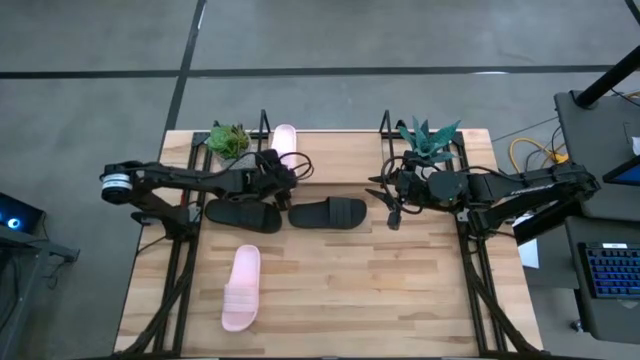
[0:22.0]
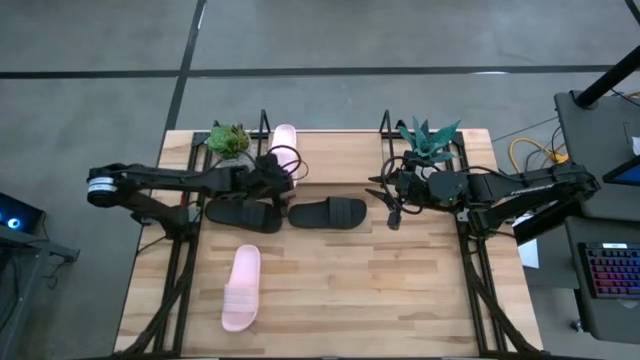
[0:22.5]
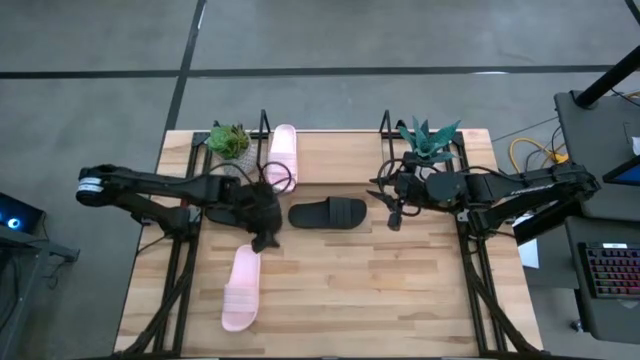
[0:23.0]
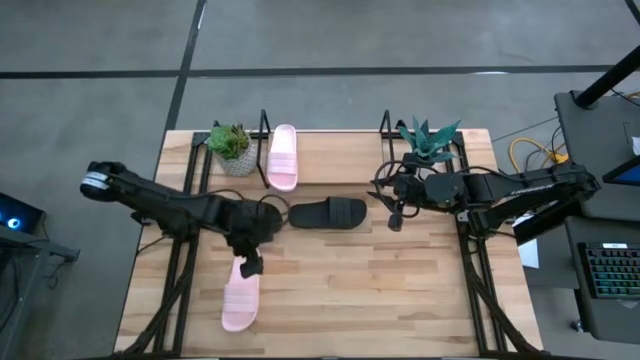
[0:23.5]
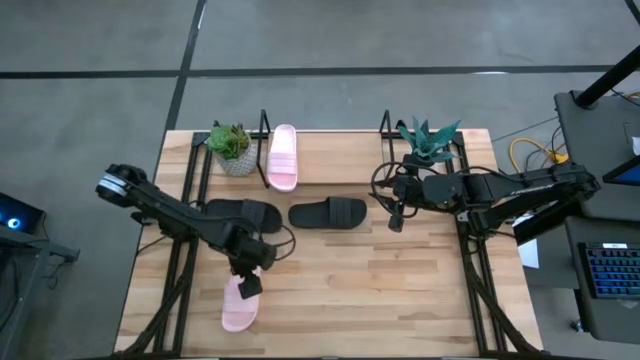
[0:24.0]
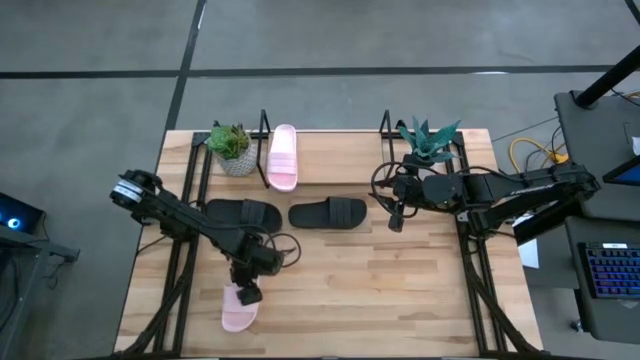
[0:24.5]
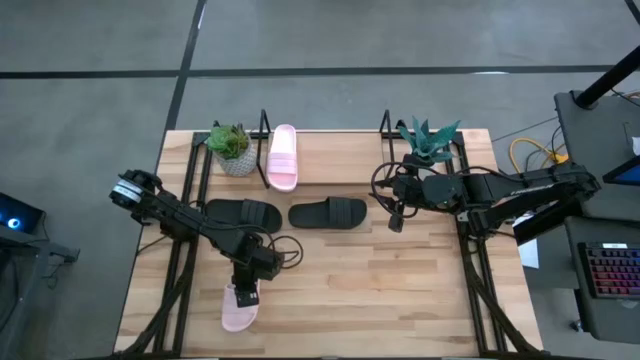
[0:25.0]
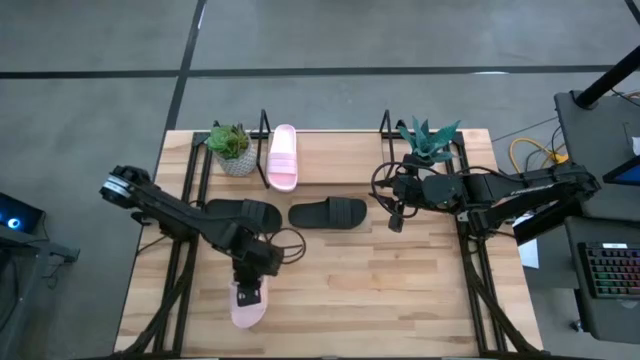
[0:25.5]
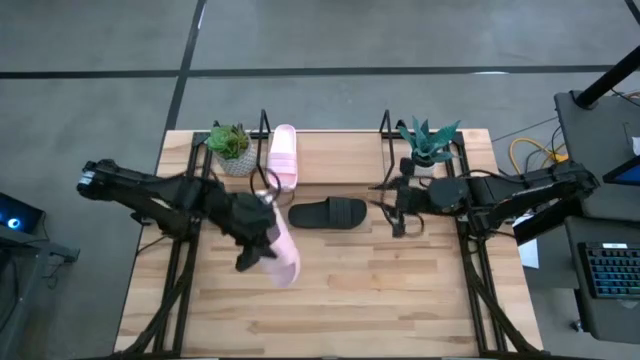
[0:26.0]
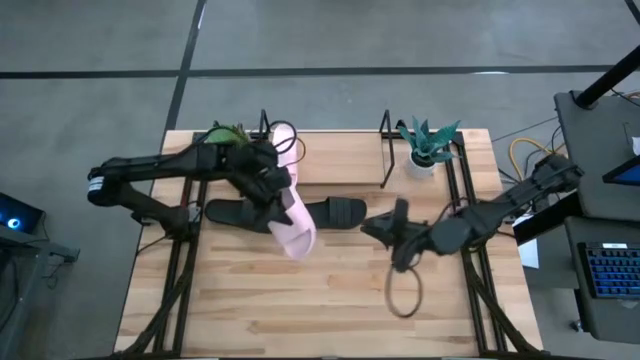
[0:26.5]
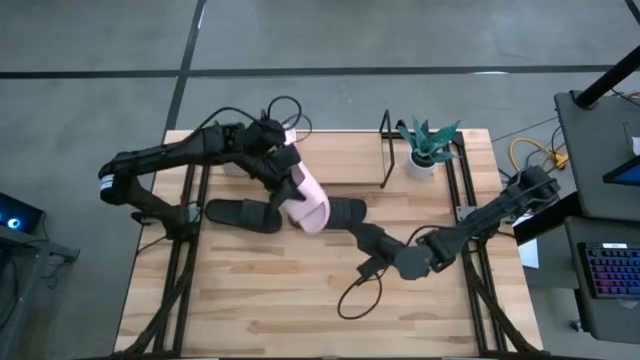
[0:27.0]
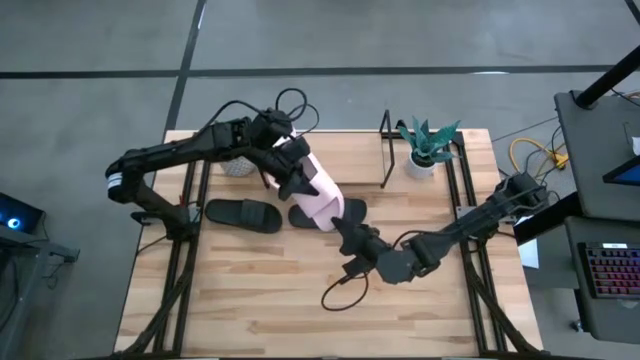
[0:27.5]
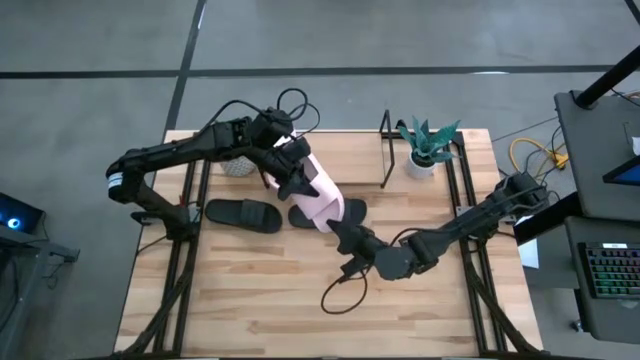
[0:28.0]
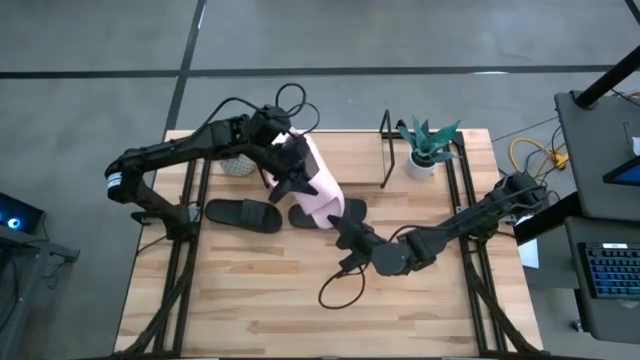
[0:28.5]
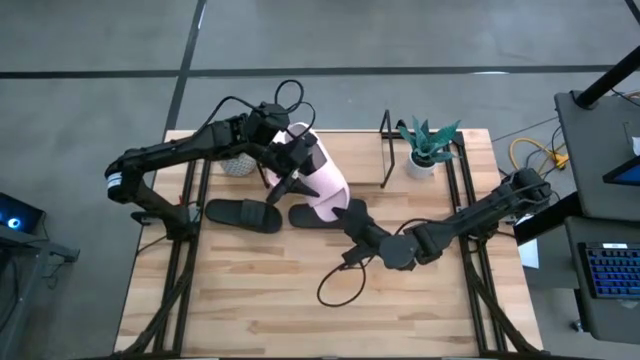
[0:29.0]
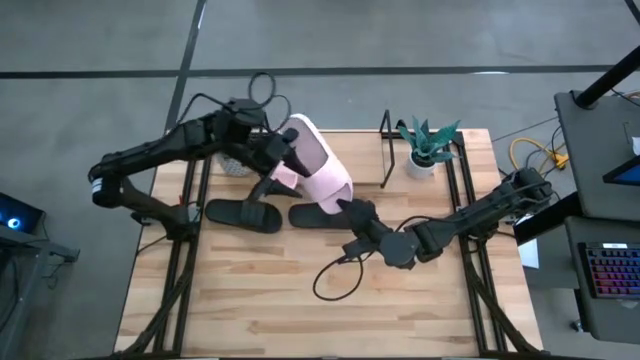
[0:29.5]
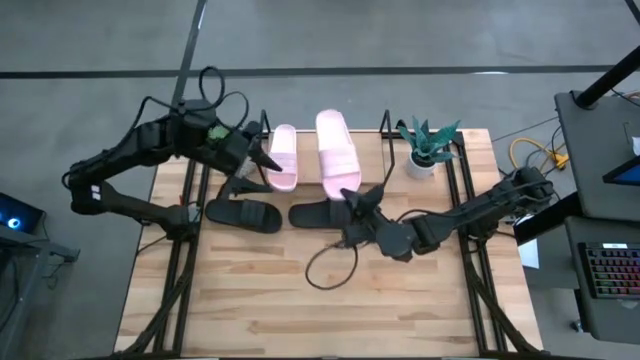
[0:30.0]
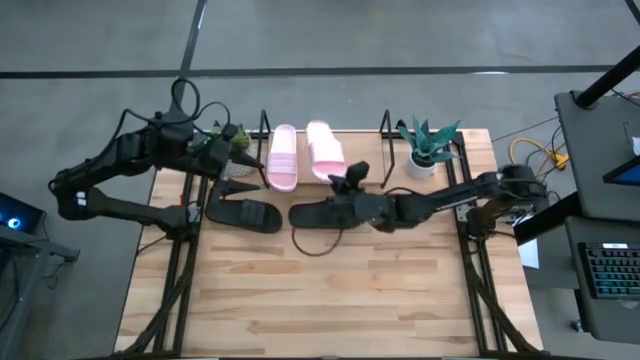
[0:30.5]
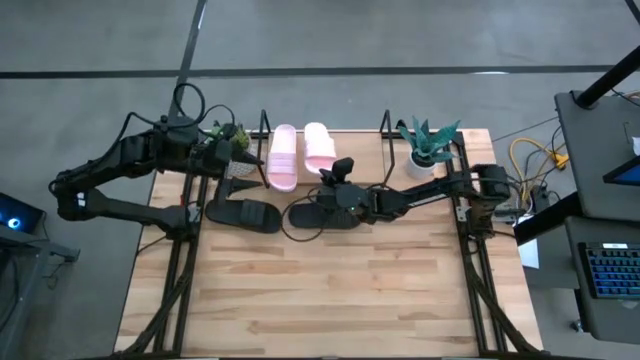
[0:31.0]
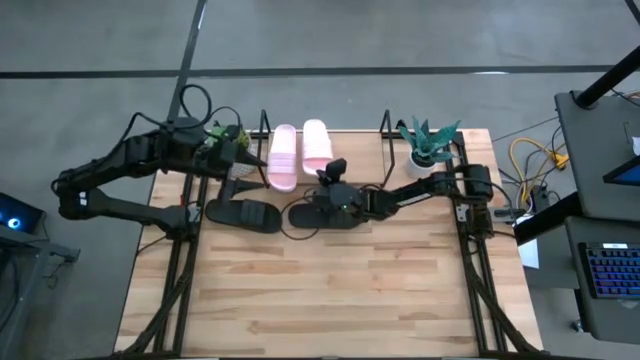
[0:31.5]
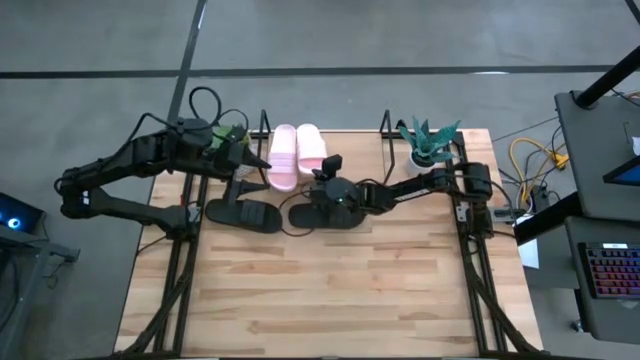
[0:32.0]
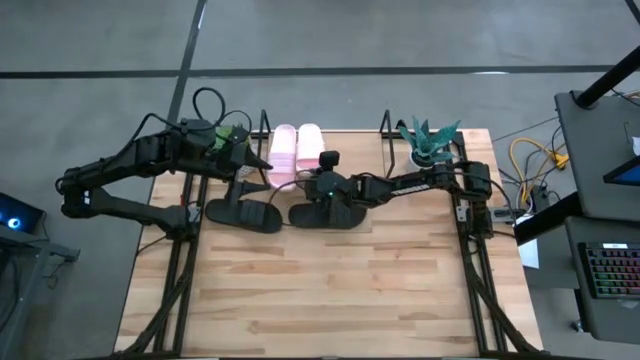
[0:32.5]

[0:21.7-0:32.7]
Task: Pick and place slides into the shelf
Put the pink slides on the shelf

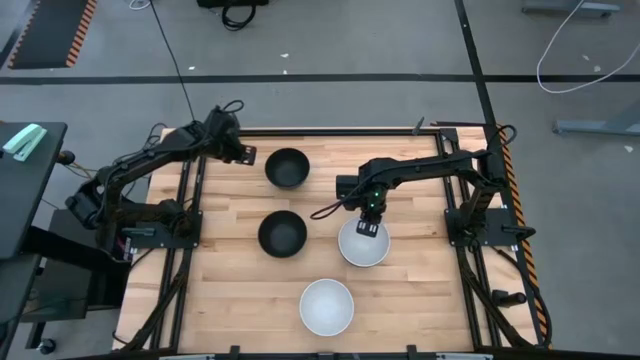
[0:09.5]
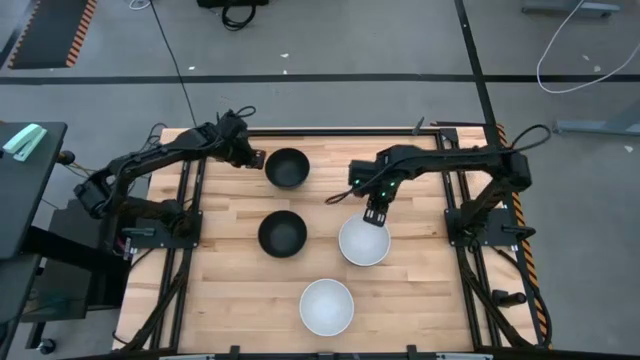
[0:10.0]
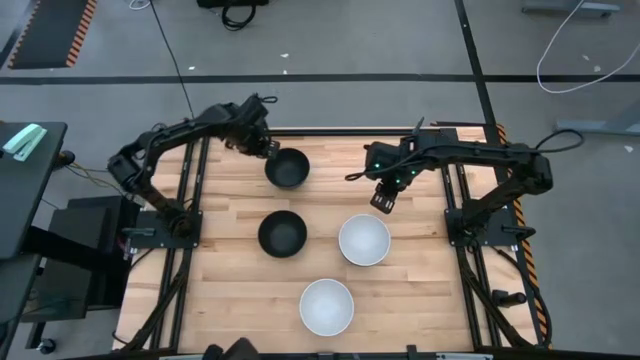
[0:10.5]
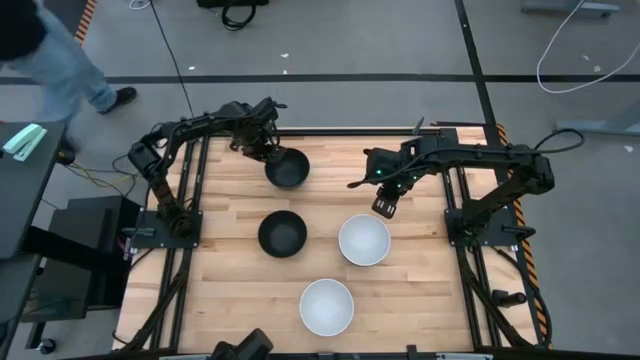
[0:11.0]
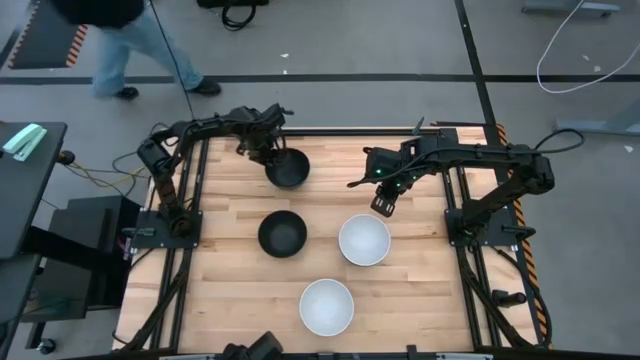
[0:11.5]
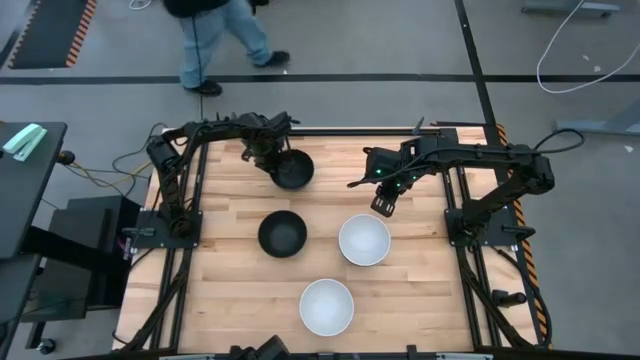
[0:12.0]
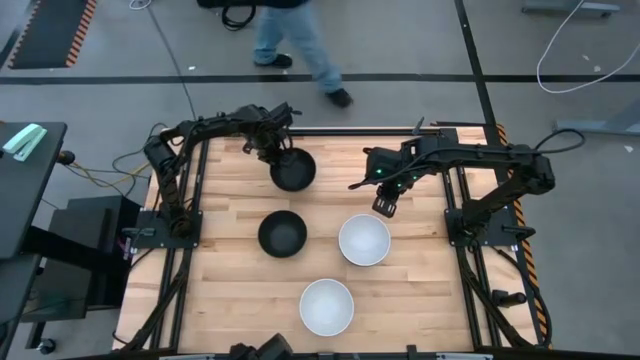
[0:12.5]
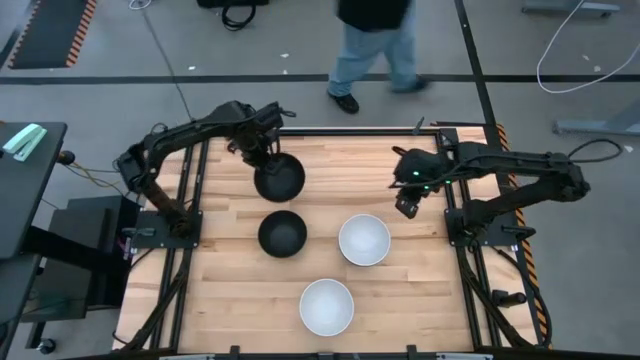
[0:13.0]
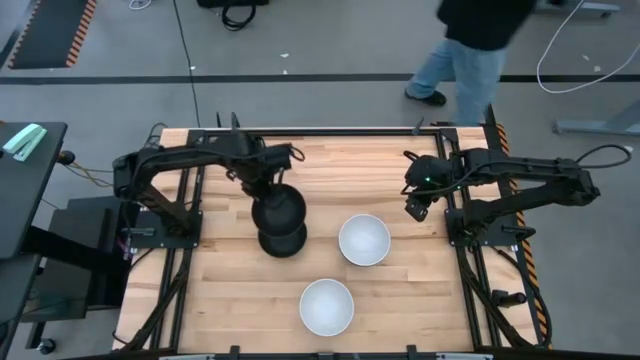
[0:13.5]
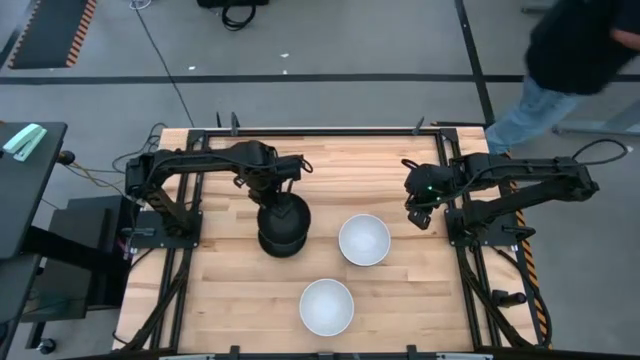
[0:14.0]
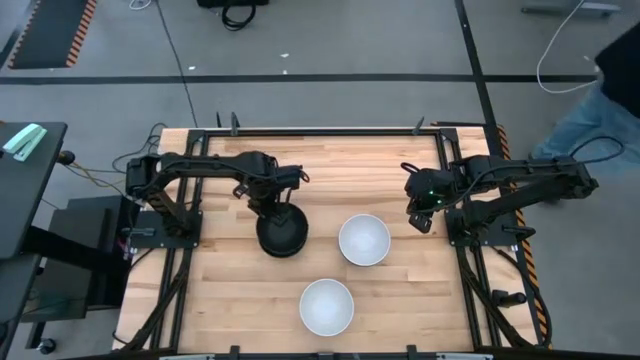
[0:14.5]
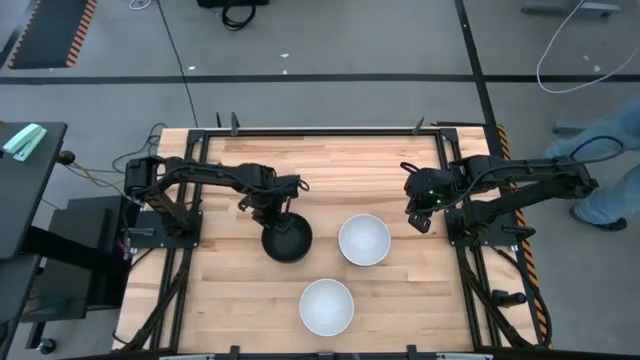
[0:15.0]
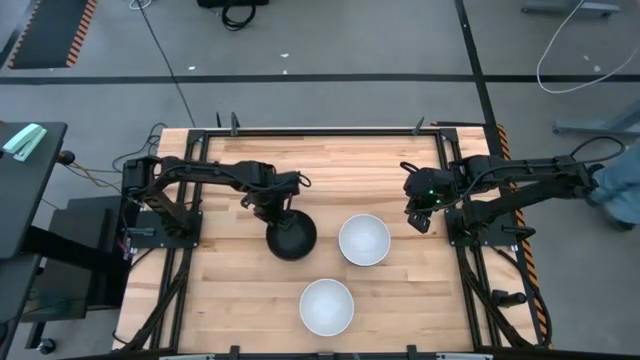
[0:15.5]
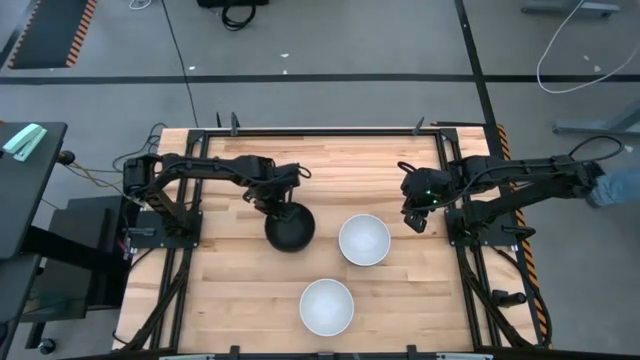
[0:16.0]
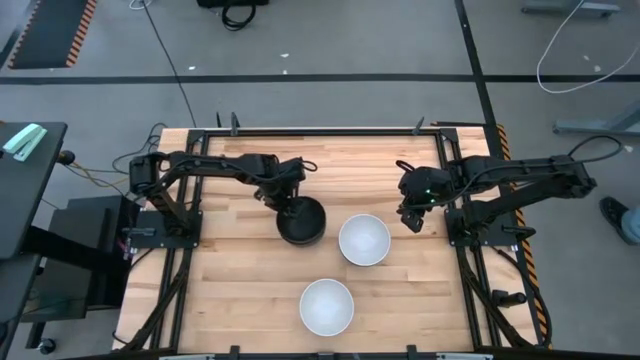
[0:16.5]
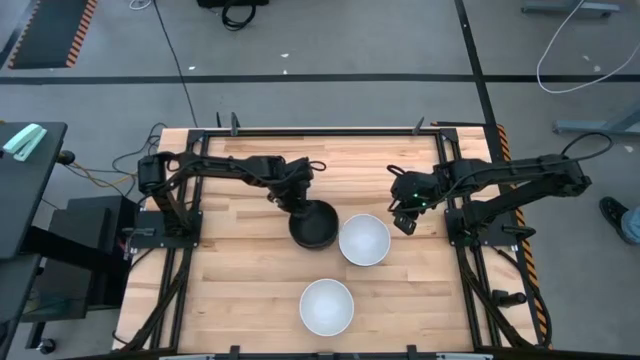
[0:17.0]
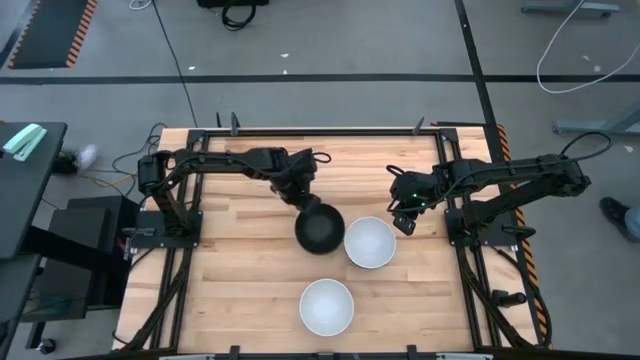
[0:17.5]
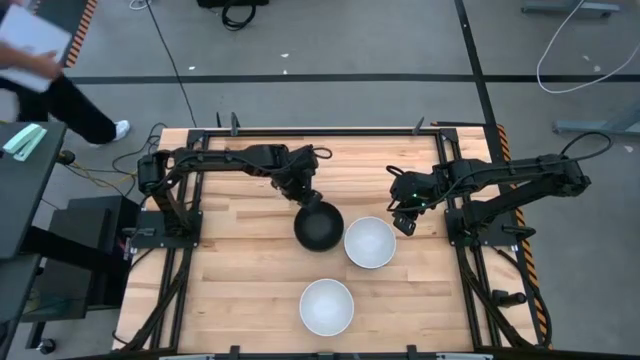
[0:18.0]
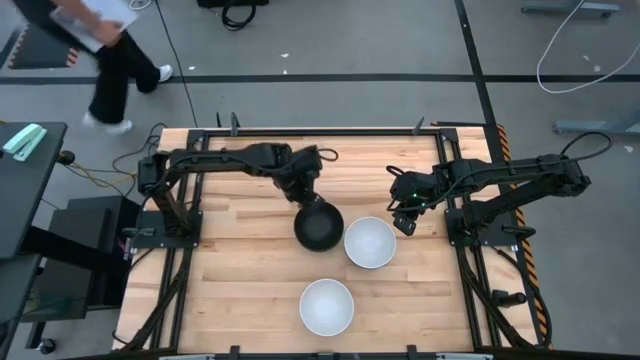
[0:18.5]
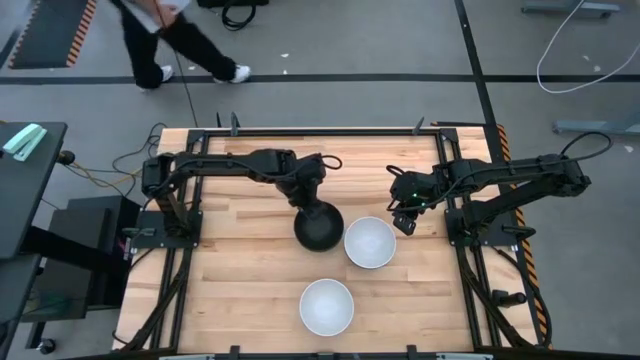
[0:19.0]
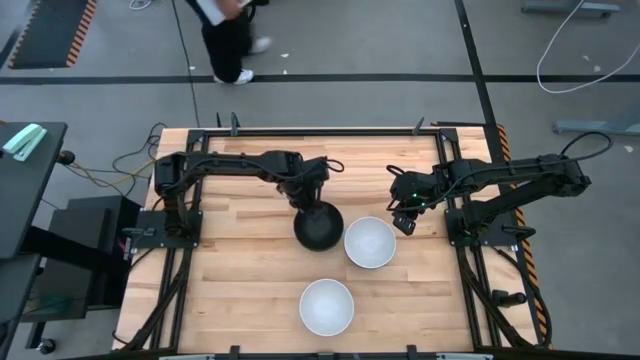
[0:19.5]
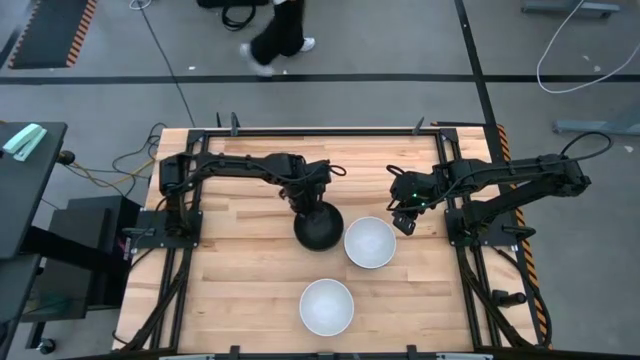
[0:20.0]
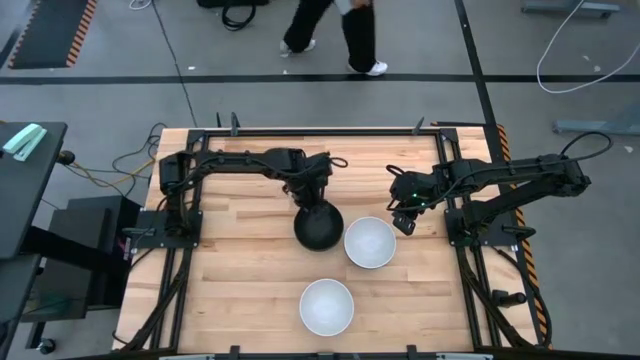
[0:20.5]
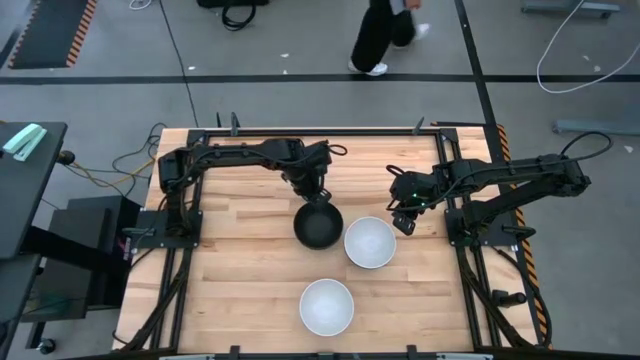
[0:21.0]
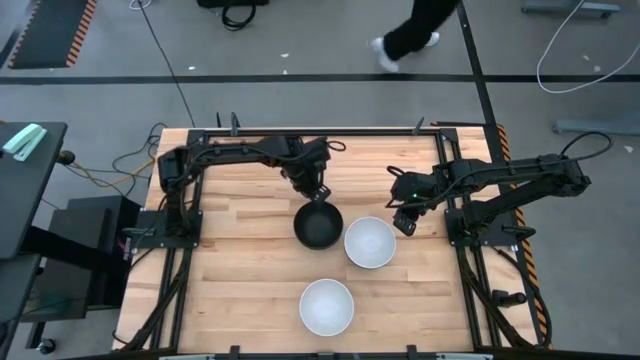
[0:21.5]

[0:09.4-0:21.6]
Task: Nest bowls inside each other
Stack the top black bowl on top of the bottom black bowl
